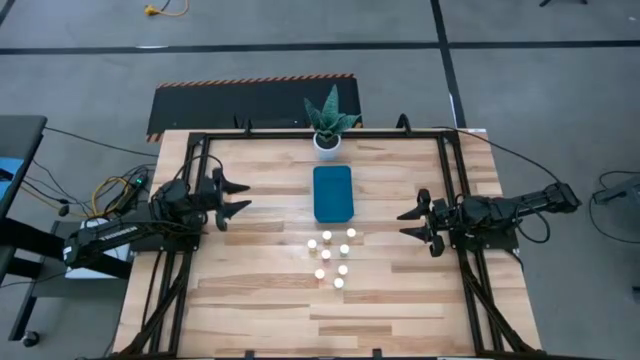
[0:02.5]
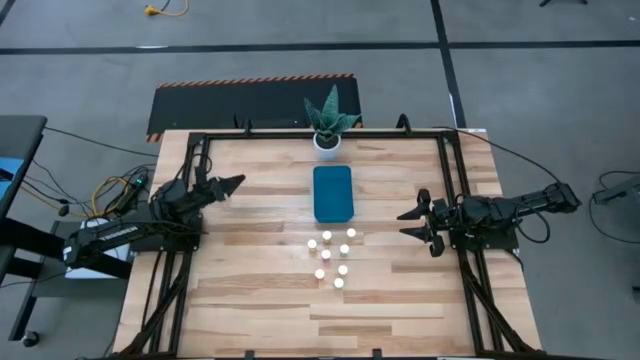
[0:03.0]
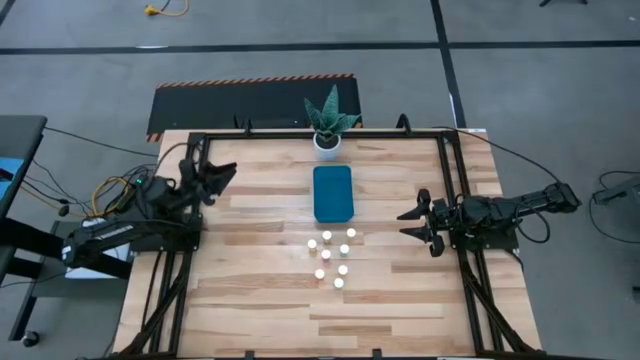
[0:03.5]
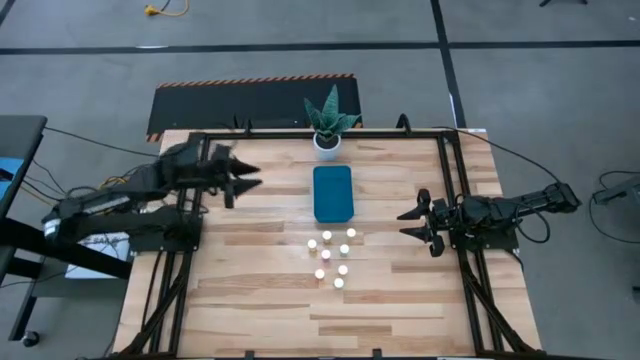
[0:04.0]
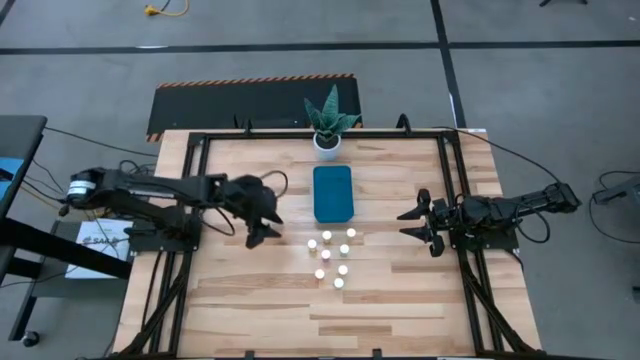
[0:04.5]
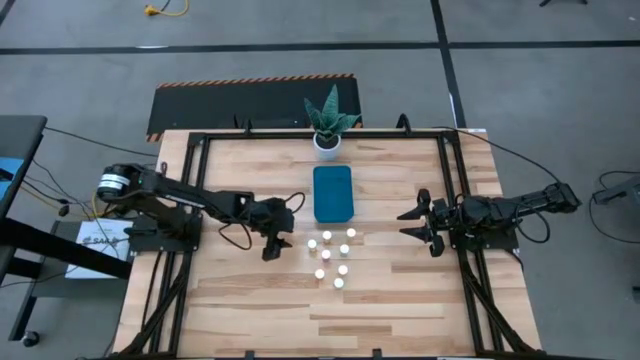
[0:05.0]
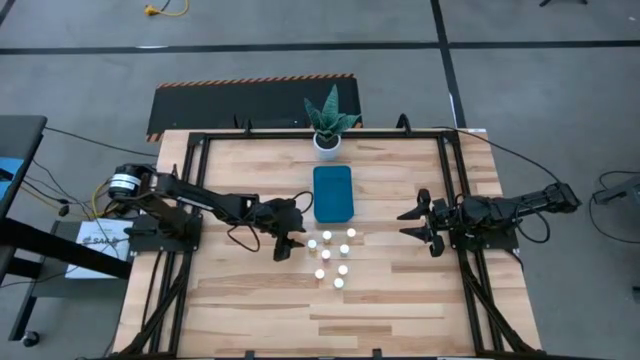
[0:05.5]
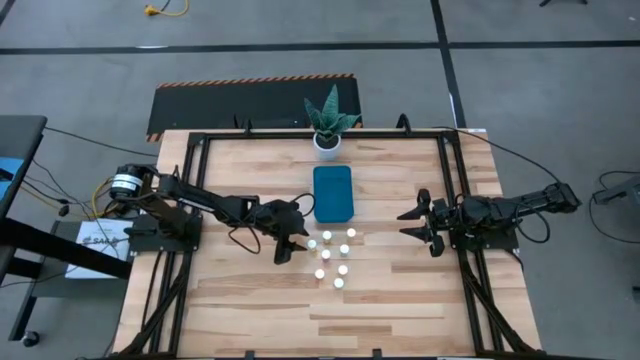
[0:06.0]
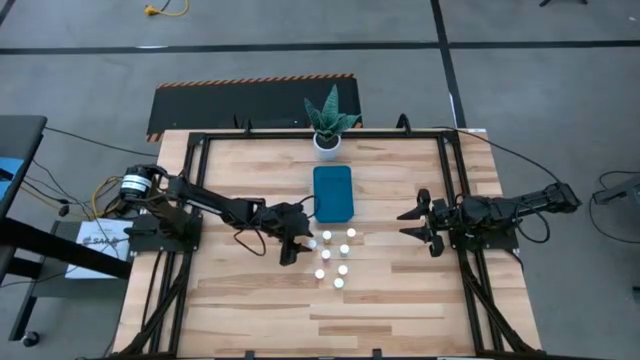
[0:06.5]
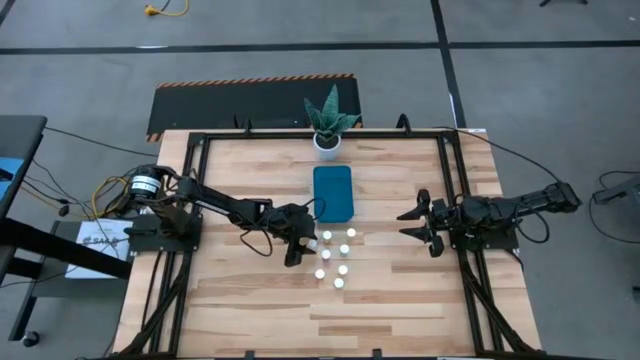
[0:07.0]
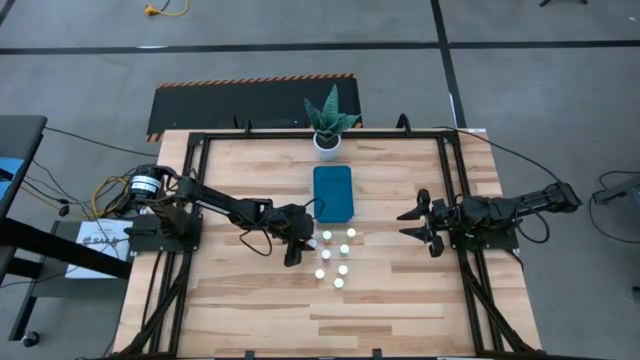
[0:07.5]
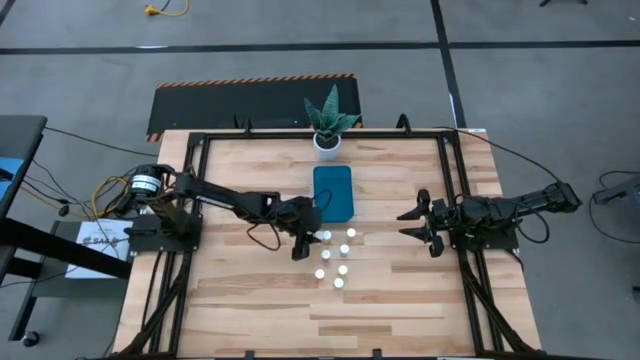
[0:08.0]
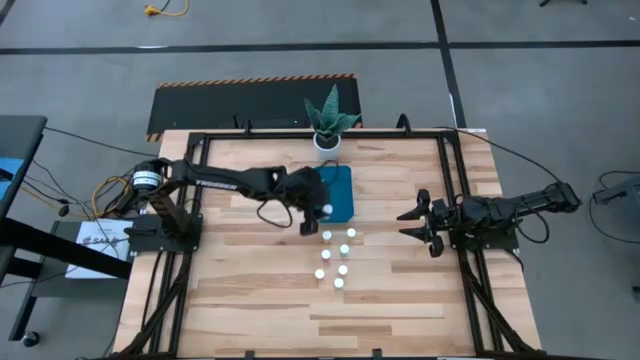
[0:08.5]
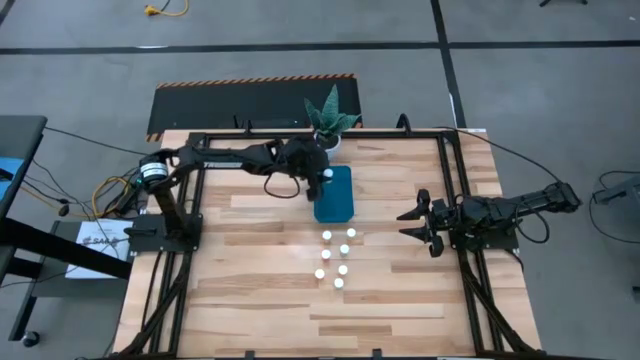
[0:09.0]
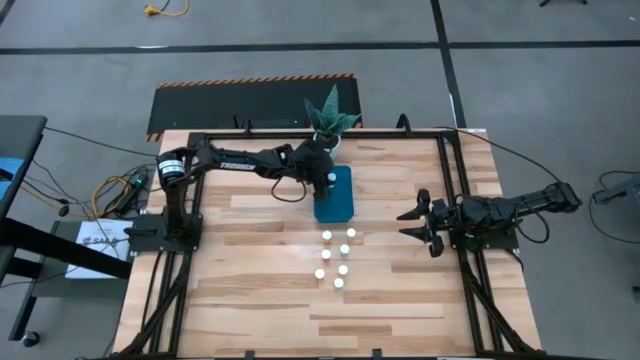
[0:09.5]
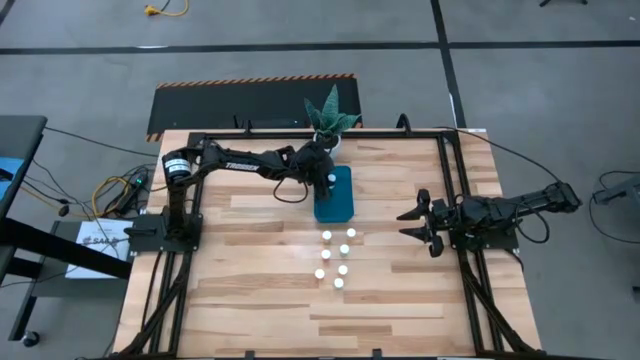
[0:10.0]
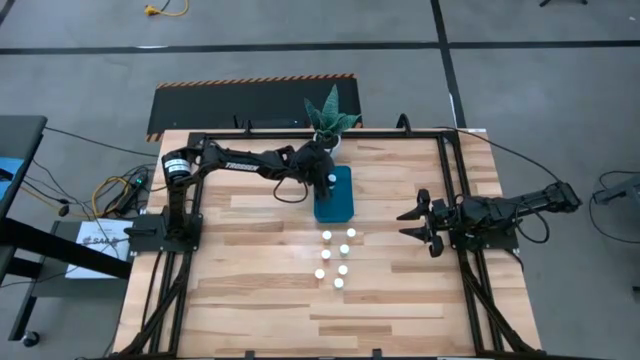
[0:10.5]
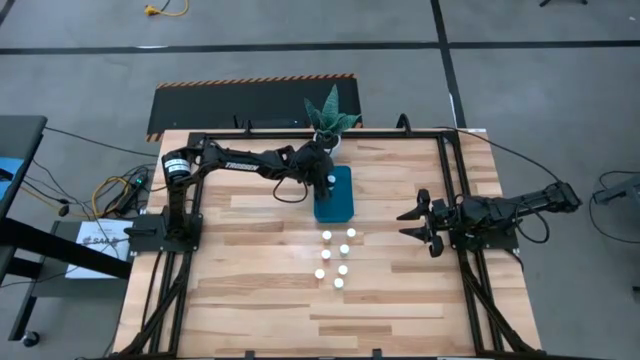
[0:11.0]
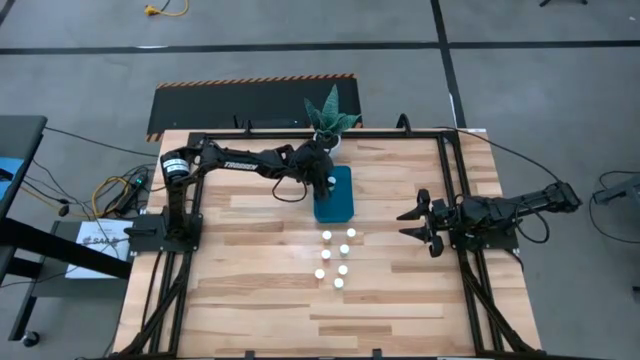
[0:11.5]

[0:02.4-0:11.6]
Task: Pick and place pill bottles into a basket
Put the yellow pill bottle into the blue bin

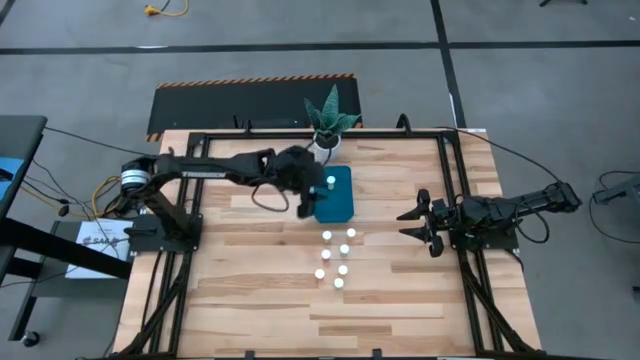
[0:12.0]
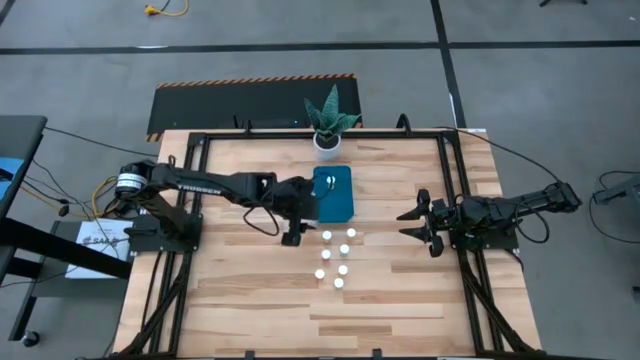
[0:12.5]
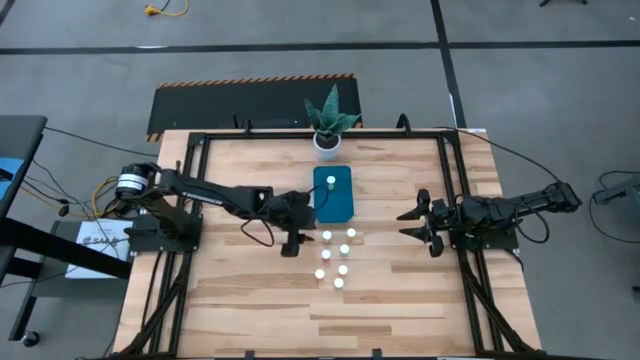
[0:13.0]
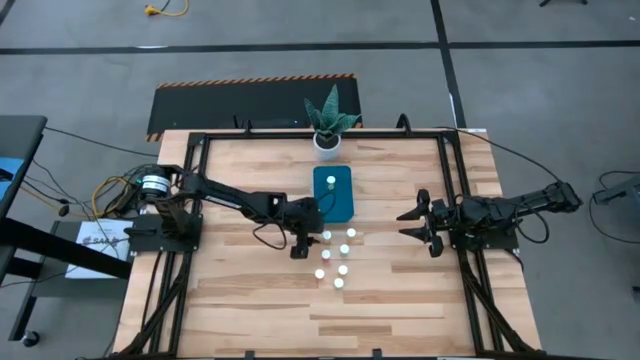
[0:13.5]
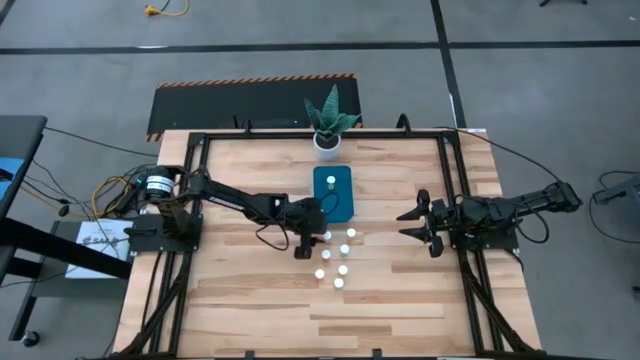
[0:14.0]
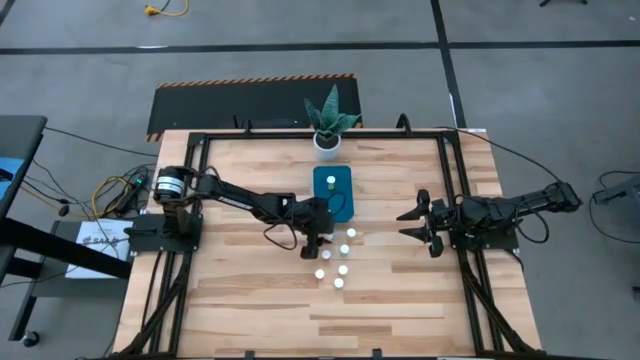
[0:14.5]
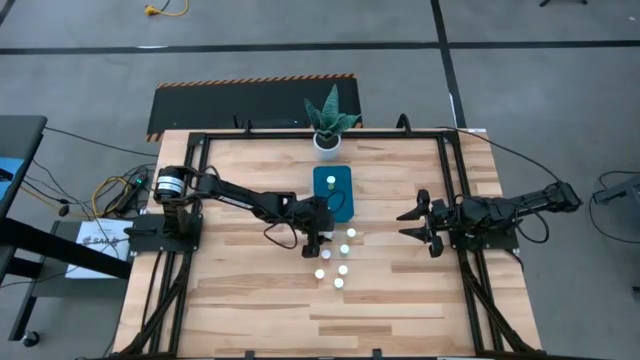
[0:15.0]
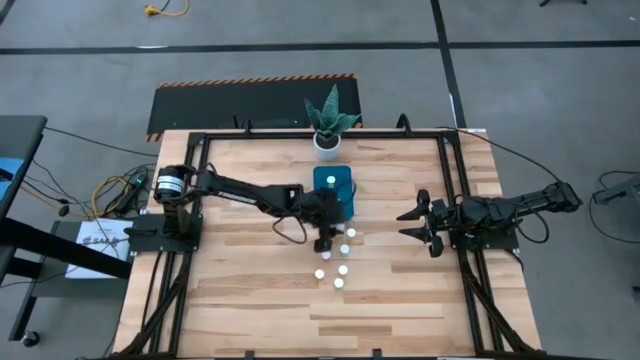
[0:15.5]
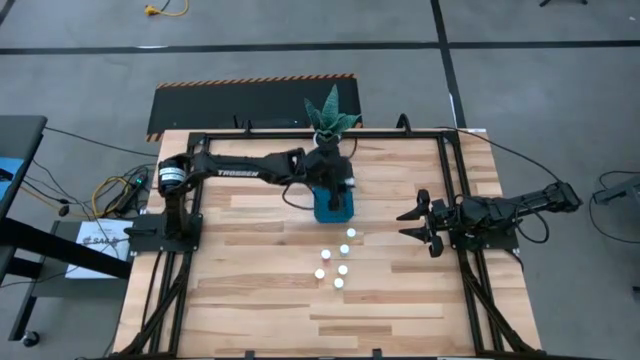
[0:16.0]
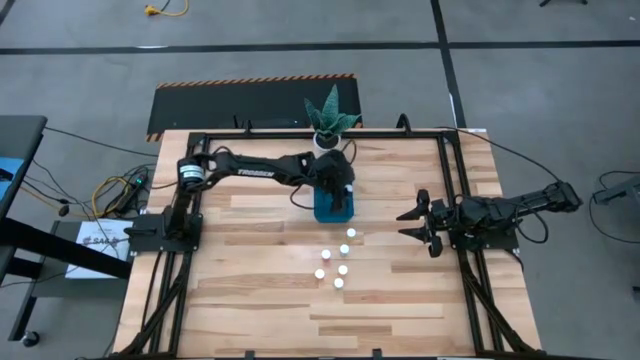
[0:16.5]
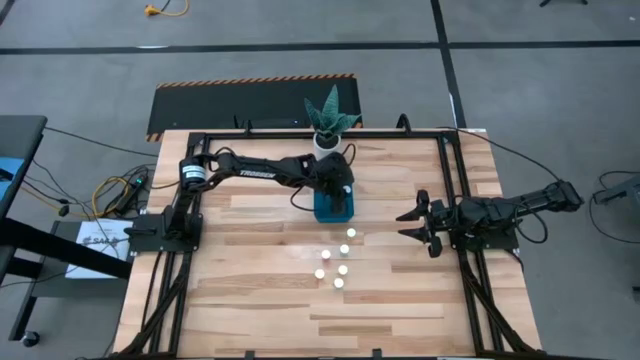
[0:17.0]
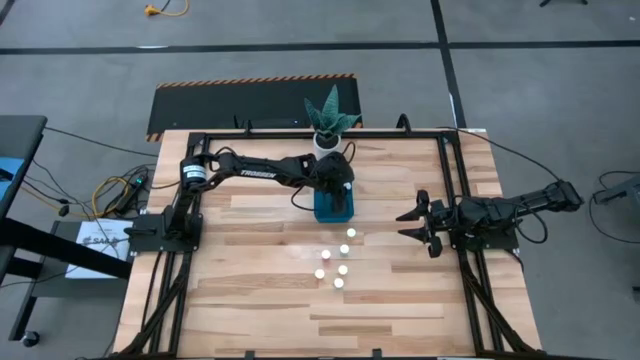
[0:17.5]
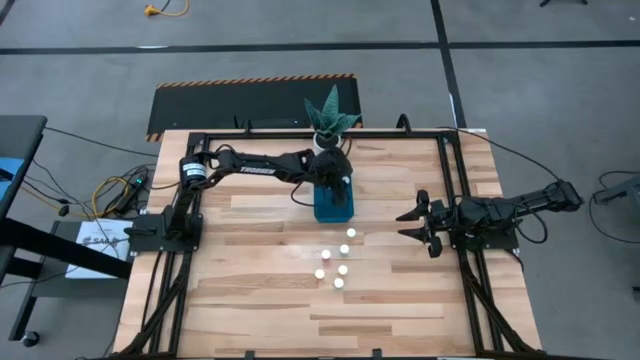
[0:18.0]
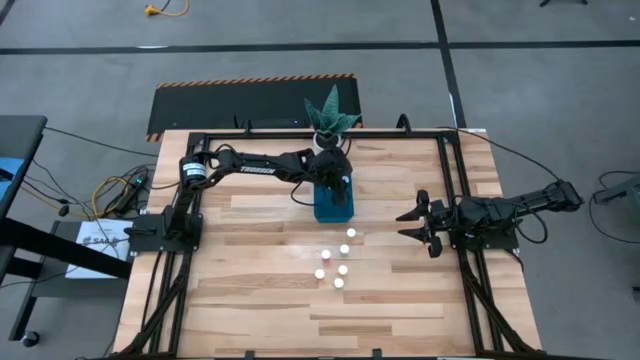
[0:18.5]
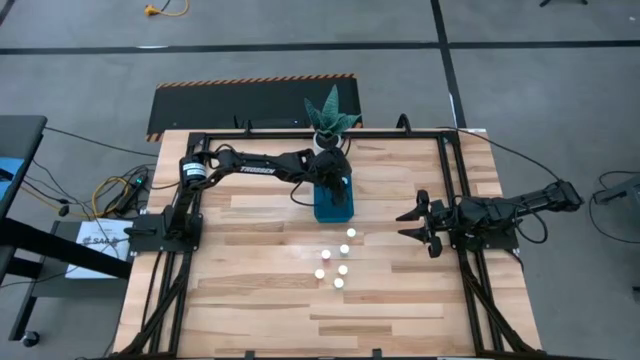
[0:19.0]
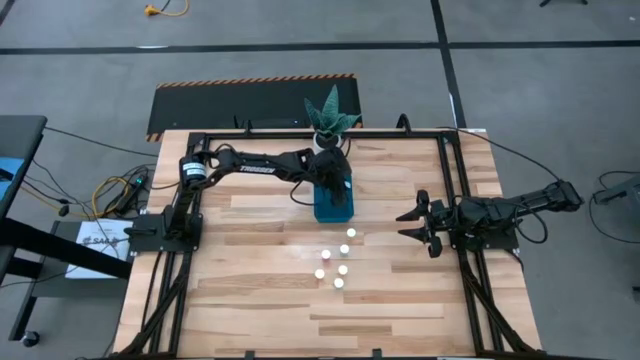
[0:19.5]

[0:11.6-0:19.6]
Put the yellow pill bottle into the blue bin

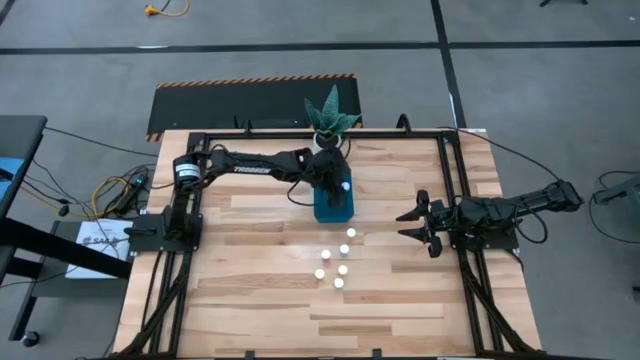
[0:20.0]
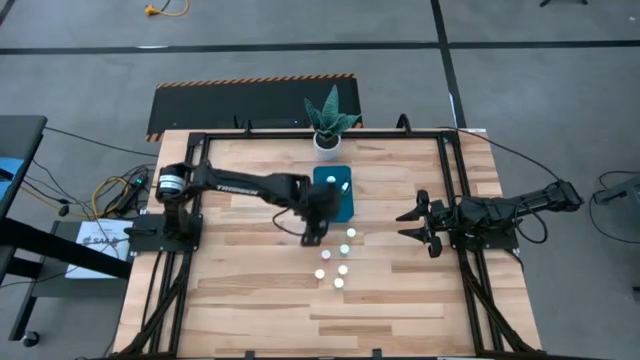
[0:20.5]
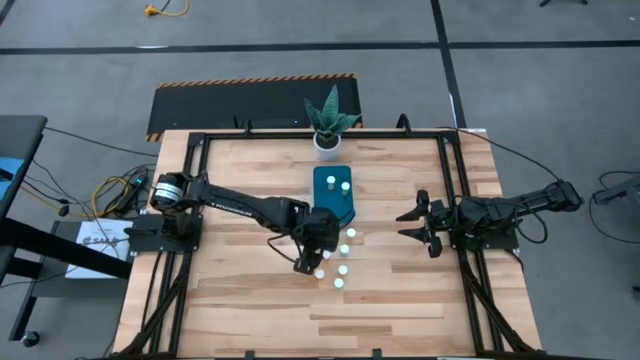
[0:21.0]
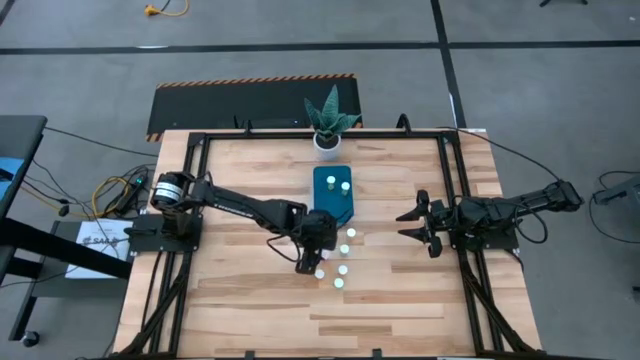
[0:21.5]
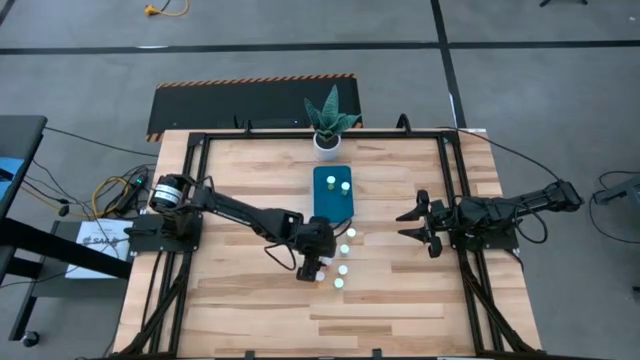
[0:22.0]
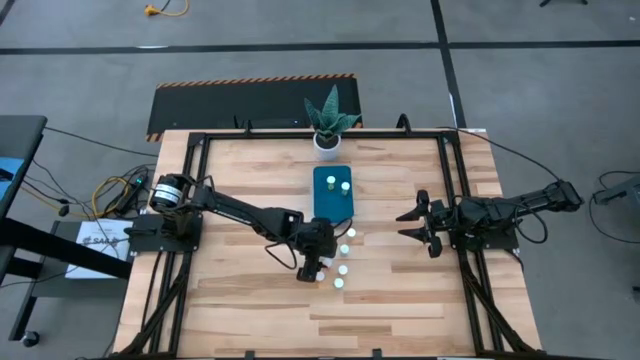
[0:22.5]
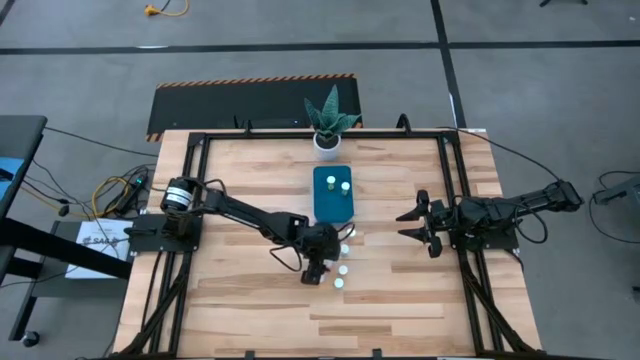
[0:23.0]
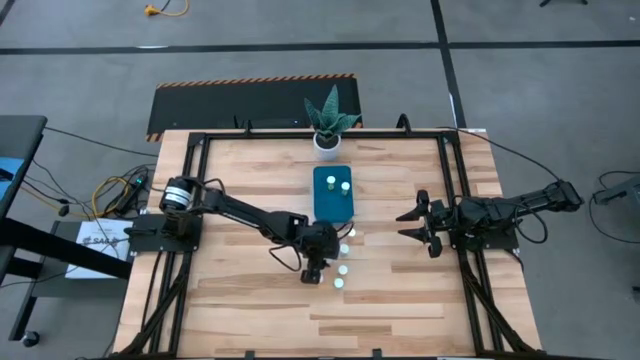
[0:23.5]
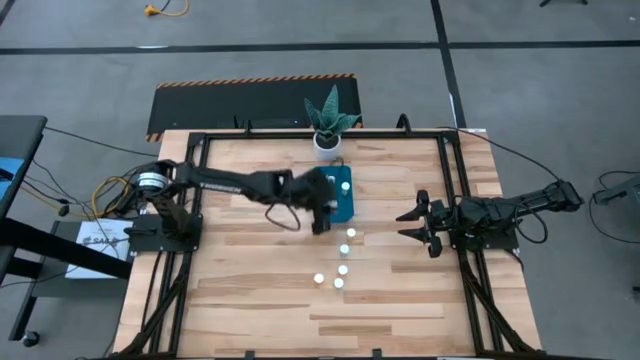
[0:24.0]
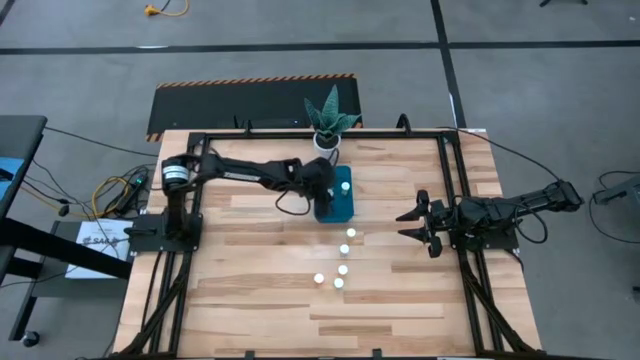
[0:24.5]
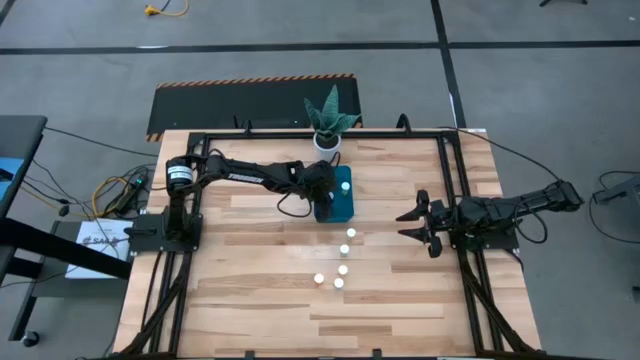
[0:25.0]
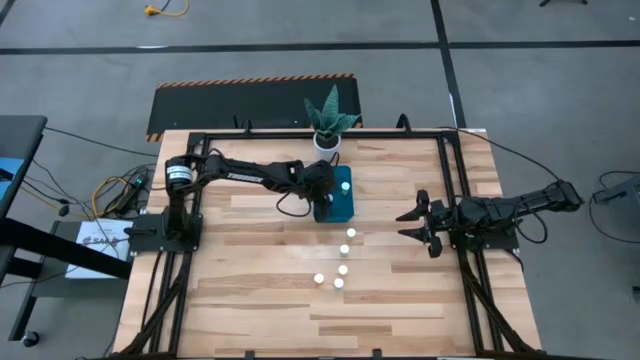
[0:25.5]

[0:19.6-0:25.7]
Put the pink pill bottle into the blue bin
